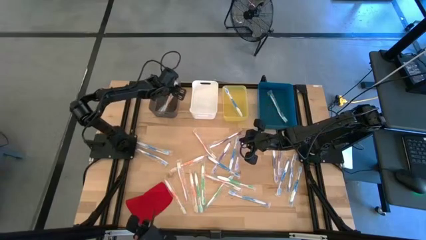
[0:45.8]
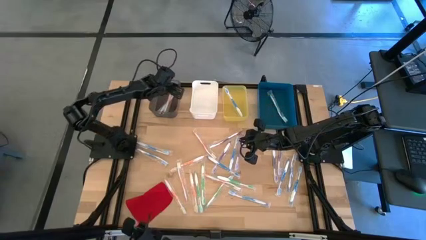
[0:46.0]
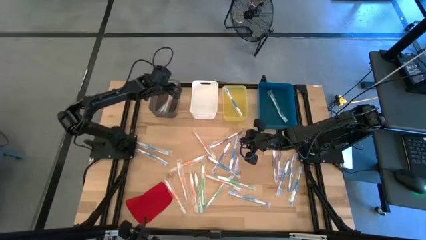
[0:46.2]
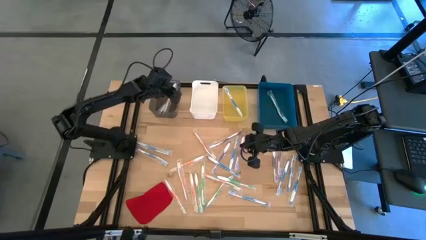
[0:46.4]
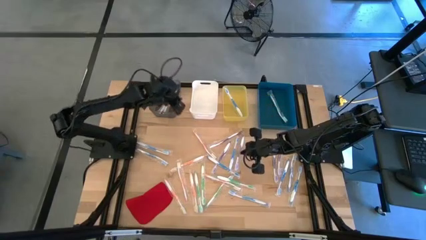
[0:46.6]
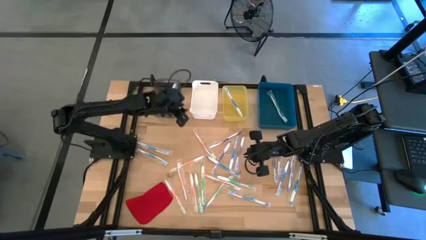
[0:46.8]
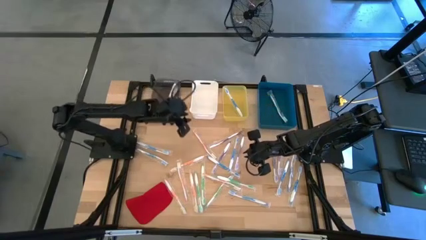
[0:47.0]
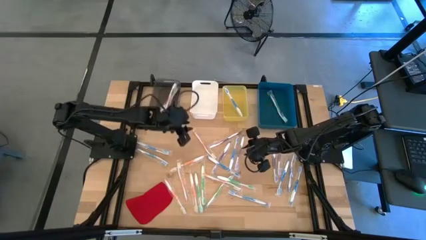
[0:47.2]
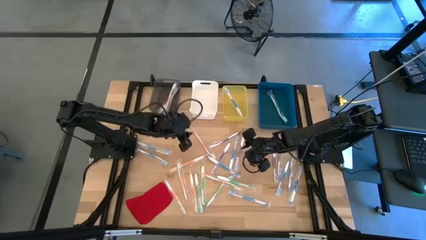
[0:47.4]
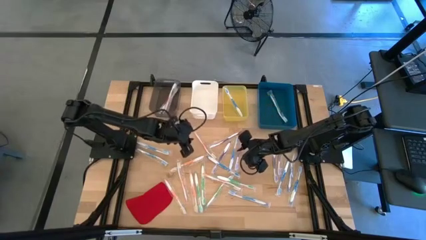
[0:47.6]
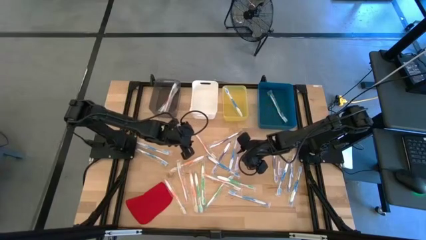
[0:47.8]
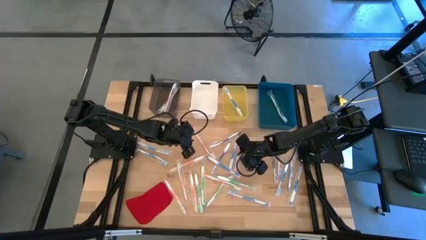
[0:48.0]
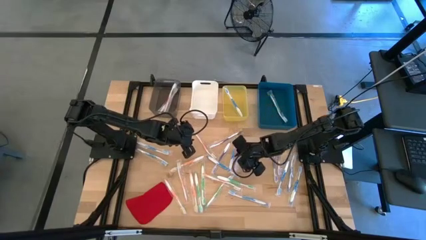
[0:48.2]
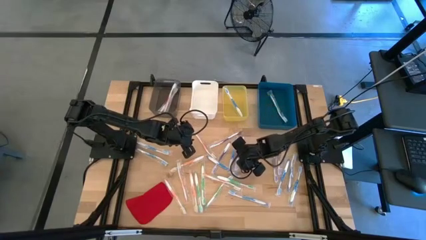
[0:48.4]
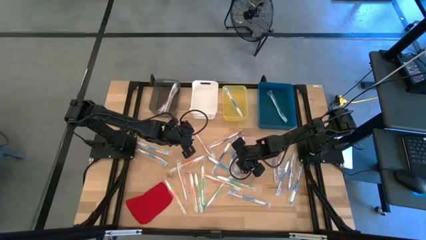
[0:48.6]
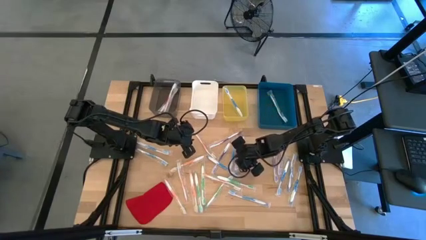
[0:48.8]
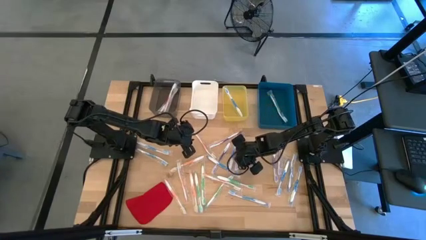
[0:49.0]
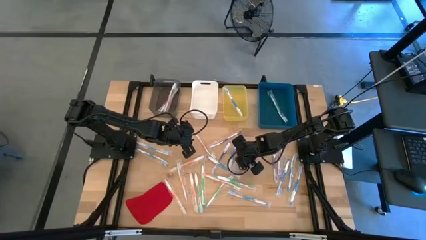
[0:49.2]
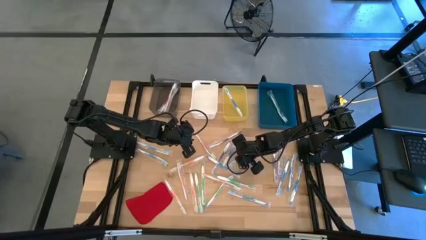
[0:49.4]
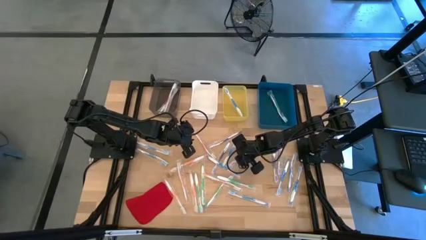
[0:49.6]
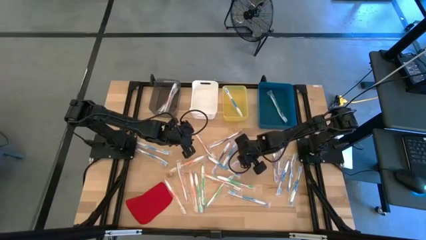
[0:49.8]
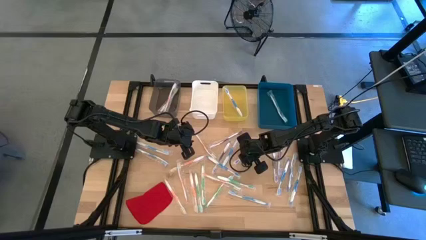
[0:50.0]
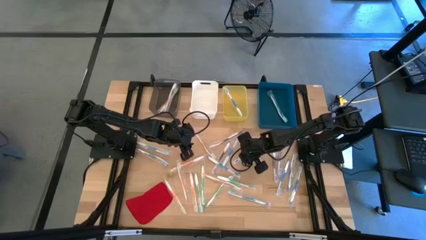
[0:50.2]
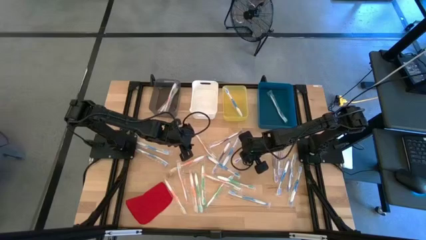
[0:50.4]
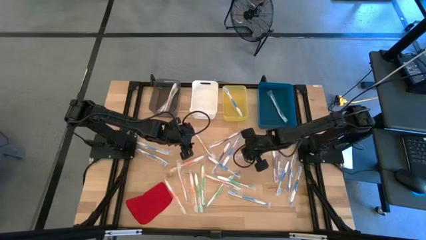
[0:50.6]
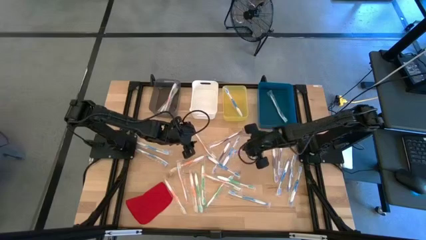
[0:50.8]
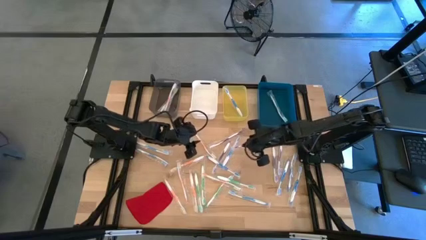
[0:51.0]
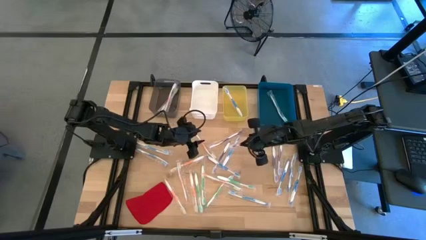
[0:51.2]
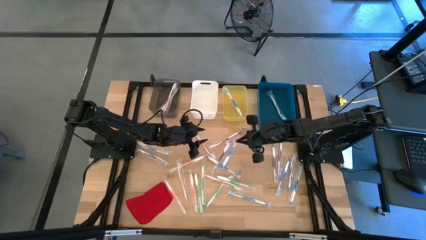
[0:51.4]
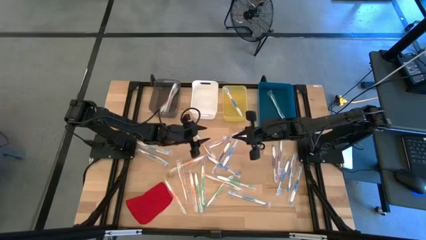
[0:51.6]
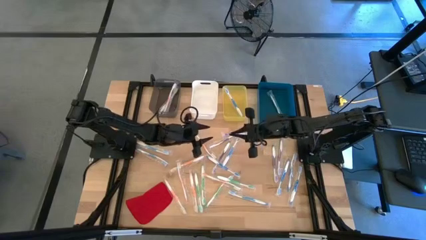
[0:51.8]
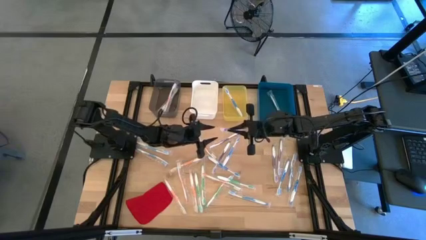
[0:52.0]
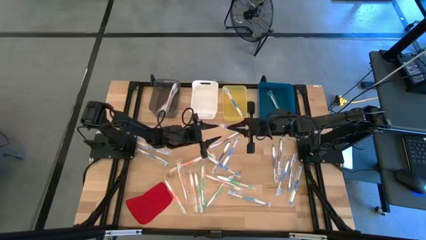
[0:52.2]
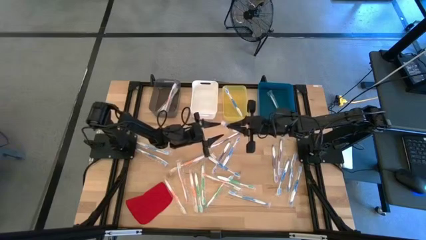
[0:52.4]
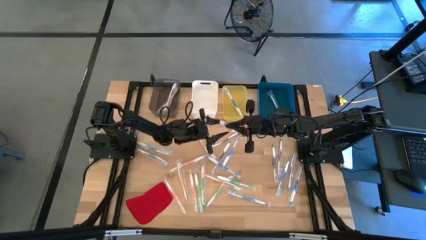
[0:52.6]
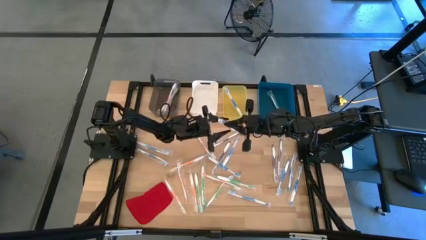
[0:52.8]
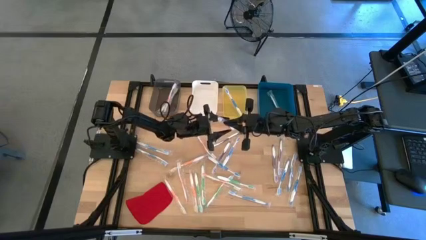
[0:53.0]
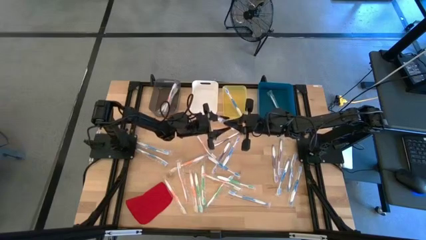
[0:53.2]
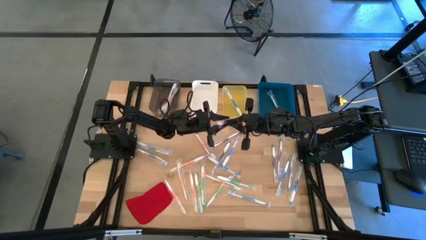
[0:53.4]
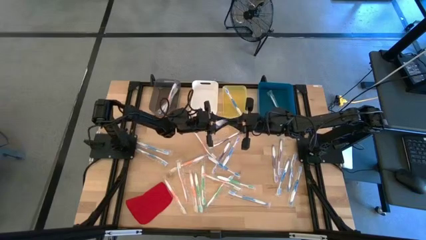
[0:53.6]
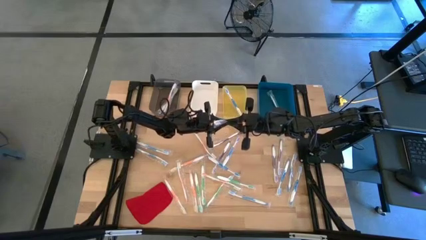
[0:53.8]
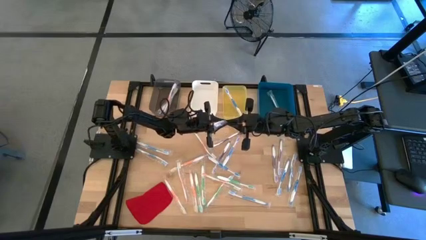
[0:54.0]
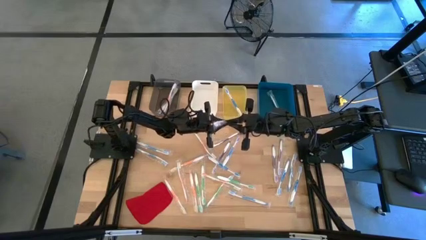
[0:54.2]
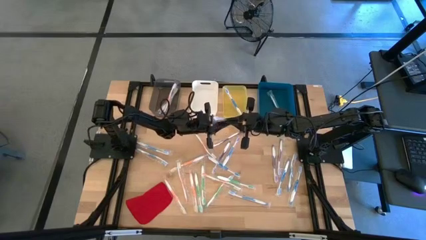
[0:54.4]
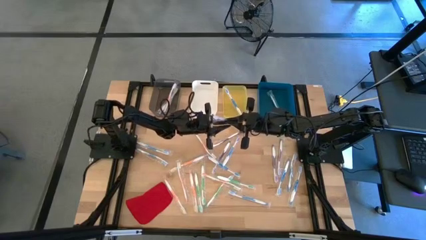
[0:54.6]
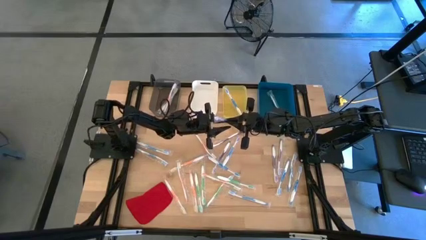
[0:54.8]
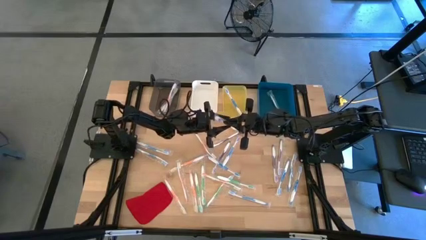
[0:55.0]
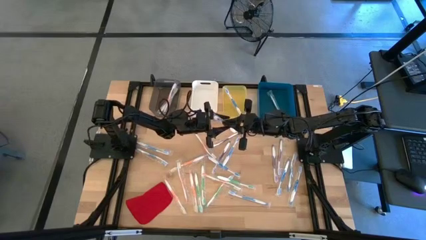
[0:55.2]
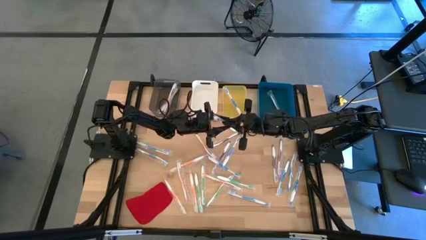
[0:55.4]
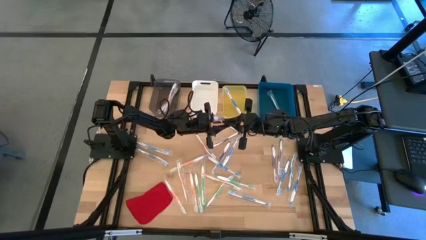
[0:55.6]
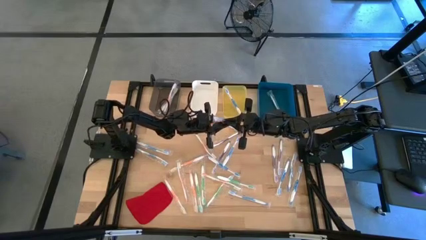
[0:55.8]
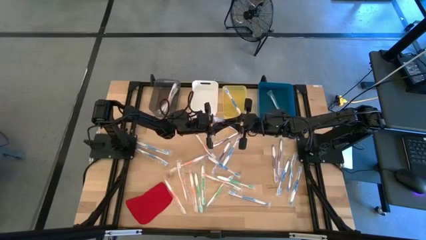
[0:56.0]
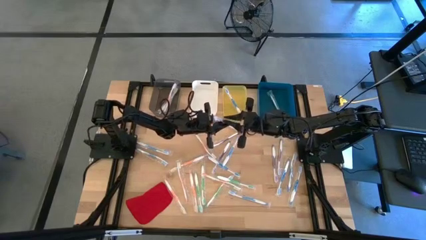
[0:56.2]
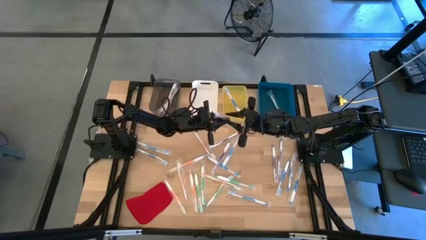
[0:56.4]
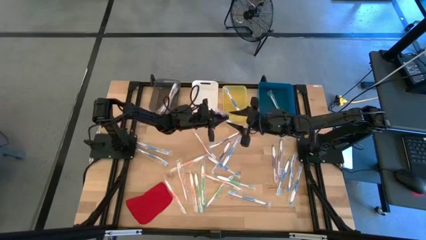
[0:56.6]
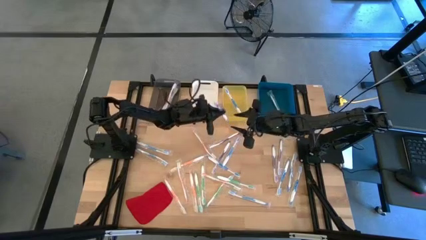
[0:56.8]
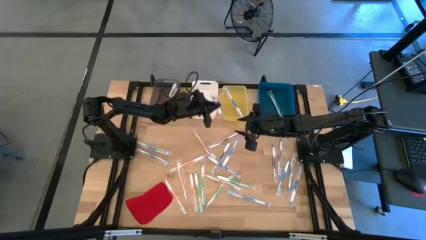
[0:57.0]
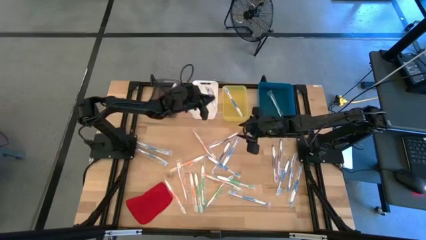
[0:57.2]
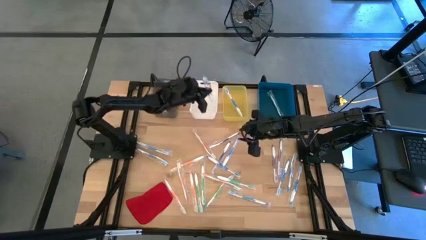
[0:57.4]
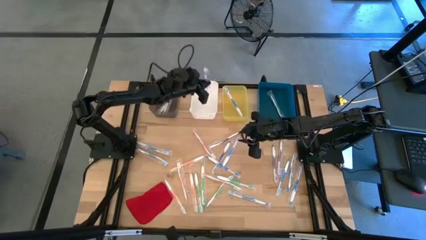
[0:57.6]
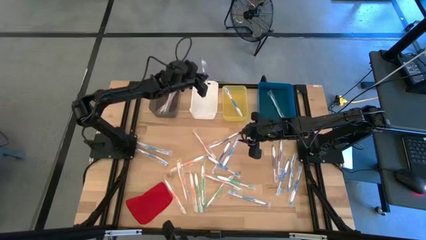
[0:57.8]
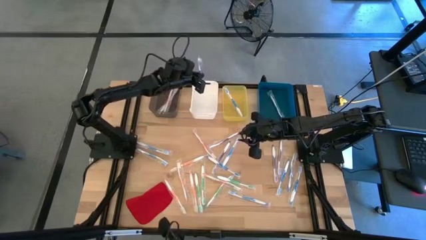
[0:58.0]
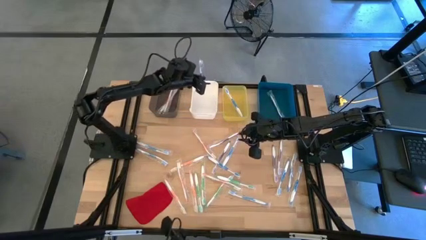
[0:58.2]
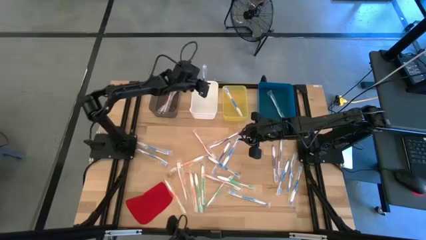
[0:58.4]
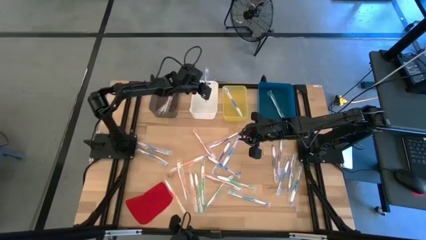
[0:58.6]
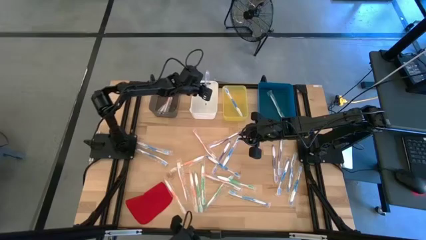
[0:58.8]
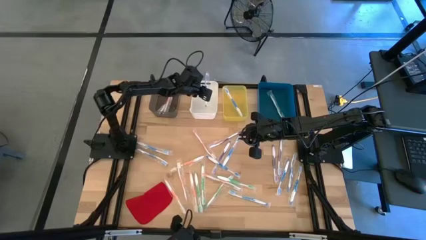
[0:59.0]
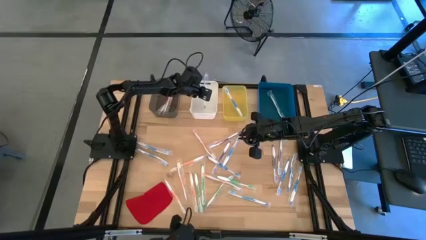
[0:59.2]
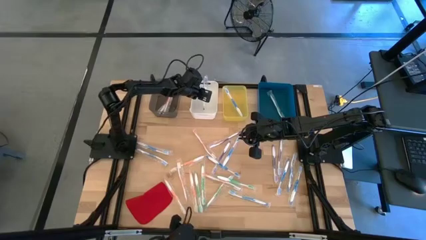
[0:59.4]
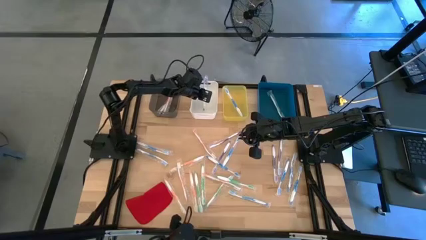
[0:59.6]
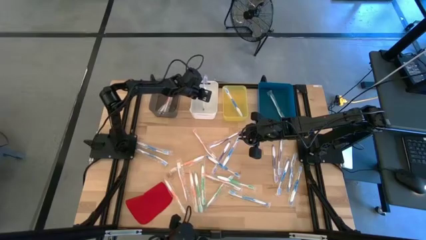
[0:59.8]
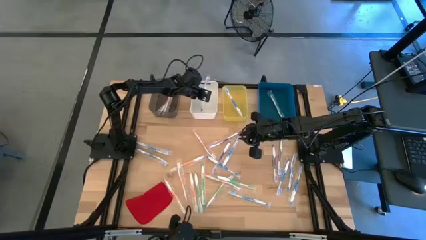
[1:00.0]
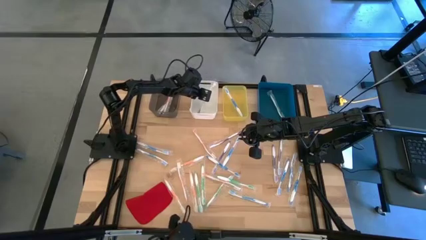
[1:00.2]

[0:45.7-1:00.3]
Task: Pick & Place Toothbrushes
Put the violet toothbrush into the white bin

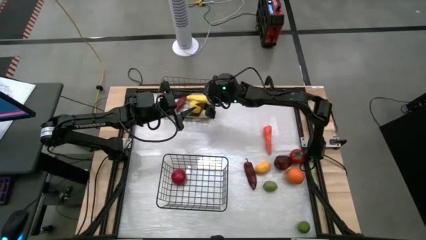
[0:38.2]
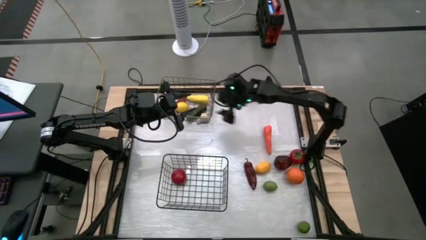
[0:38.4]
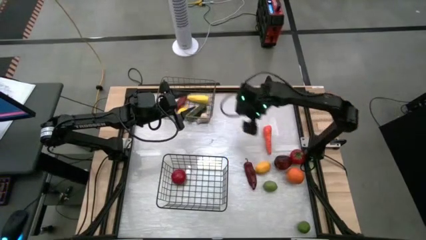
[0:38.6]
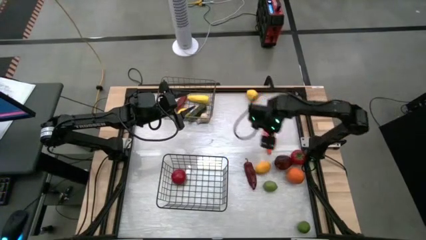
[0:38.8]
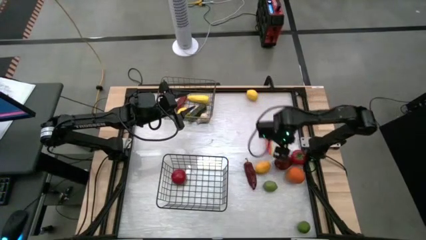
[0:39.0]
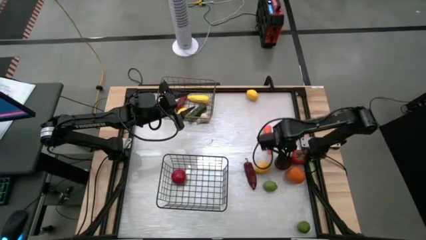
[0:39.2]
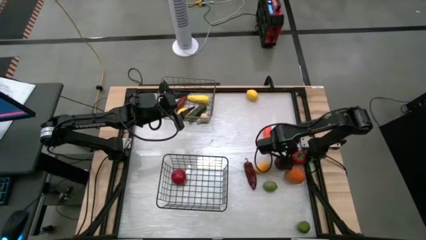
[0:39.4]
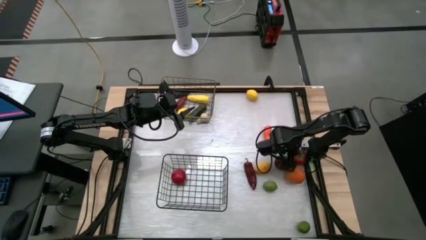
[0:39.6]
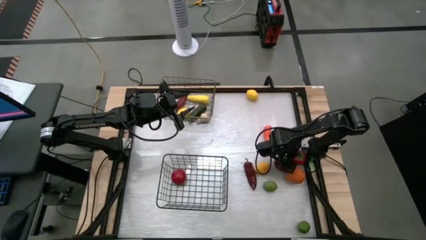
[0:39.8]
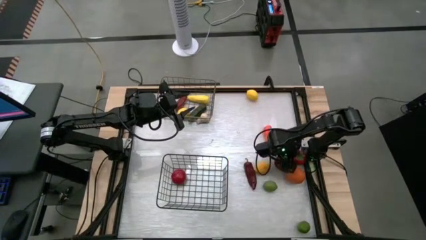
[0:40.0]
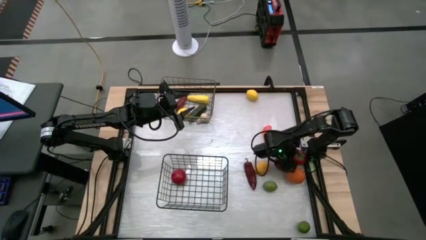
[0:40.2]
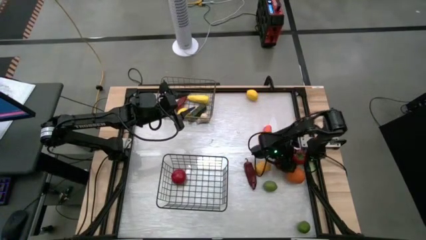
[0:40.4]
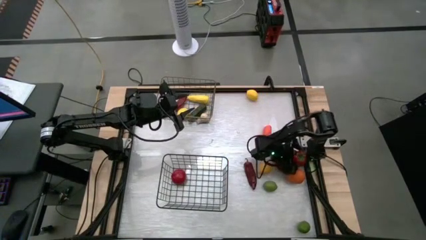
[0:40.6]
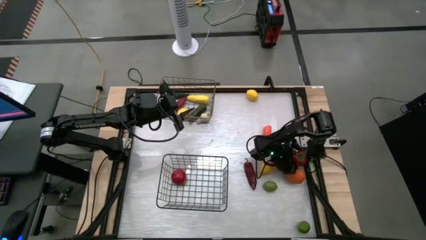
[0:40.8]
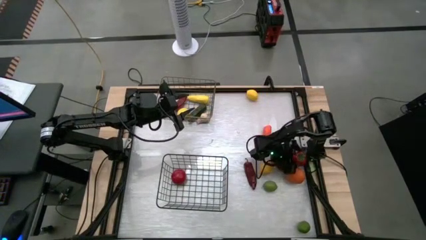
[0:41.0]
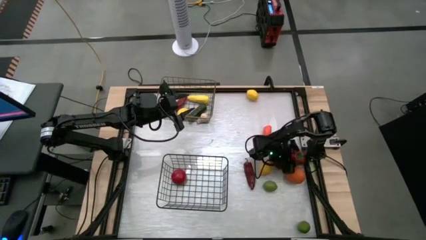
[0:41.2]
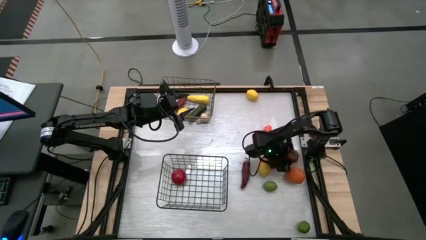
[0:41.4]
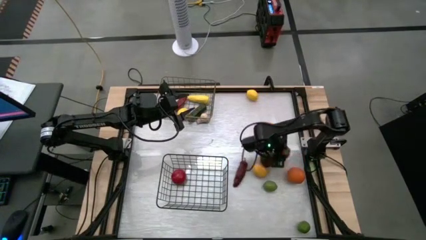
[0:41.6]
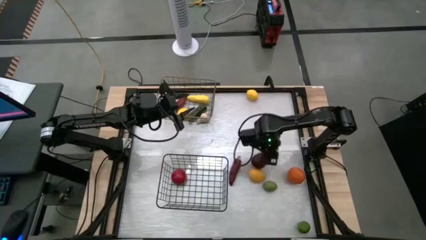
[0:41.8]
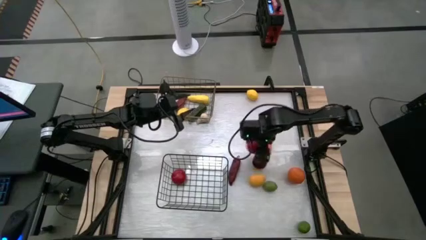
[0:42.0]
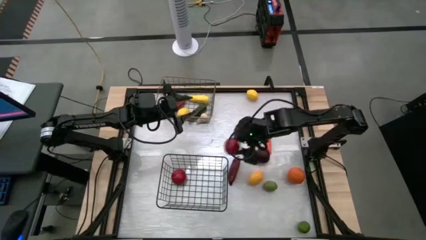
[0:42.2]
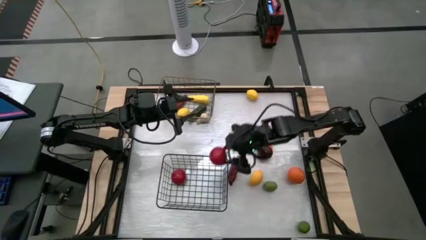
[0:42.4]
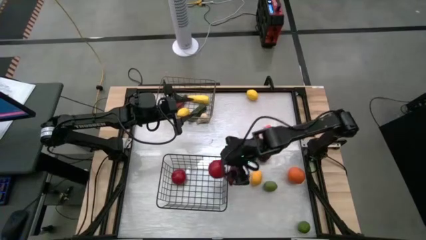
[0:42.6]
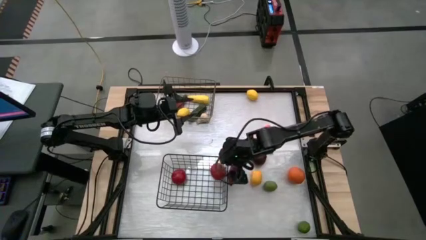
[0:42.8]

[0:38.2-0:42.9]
Task: Sort produce into baskets
Put the red tomato into the bottom wire basket
